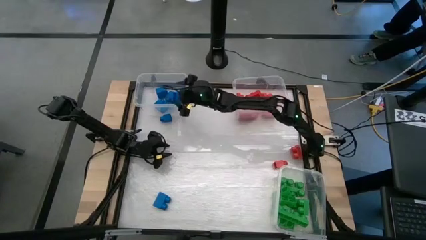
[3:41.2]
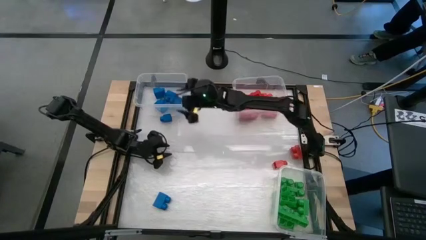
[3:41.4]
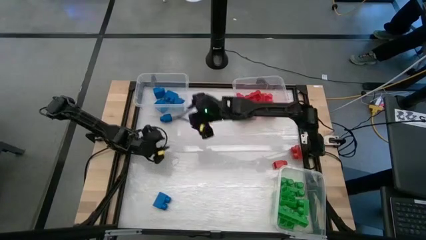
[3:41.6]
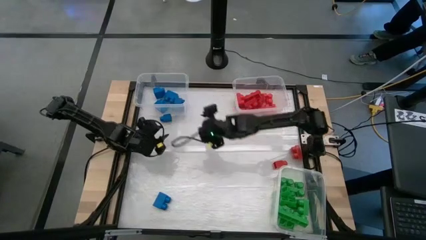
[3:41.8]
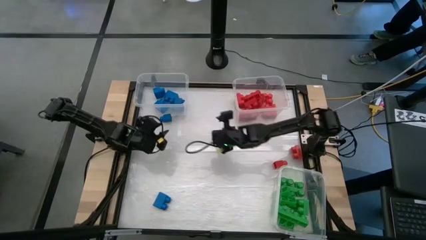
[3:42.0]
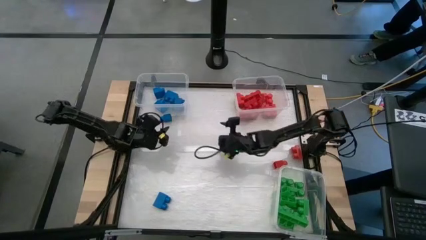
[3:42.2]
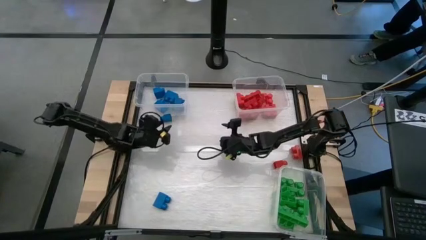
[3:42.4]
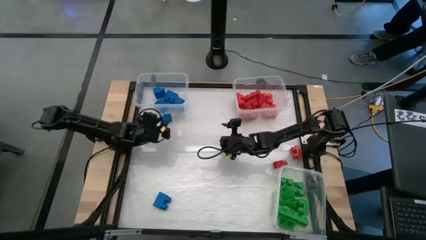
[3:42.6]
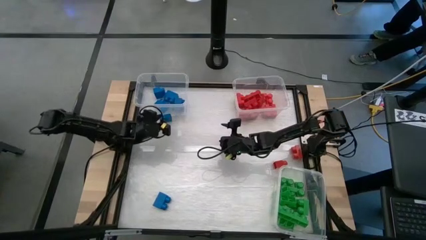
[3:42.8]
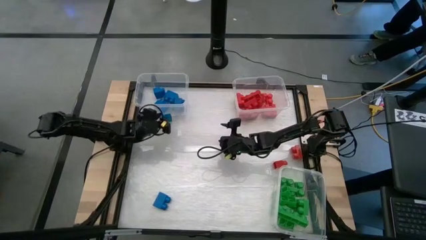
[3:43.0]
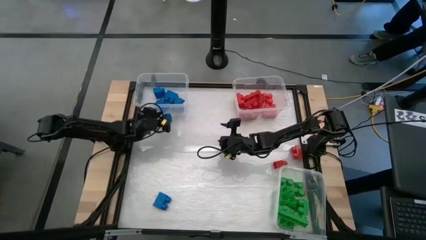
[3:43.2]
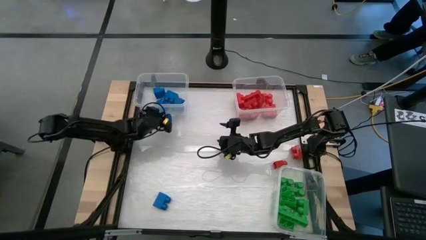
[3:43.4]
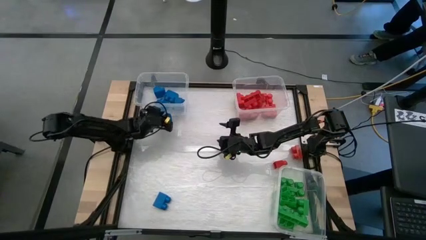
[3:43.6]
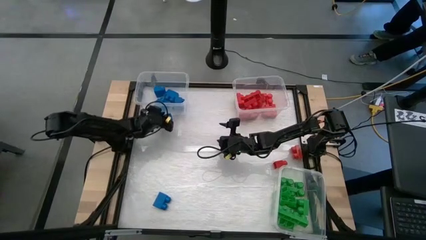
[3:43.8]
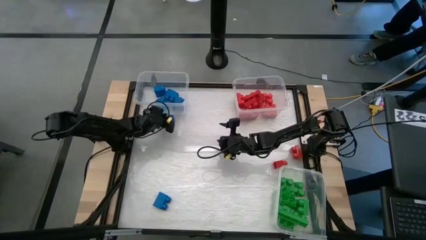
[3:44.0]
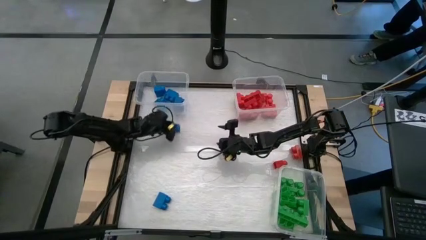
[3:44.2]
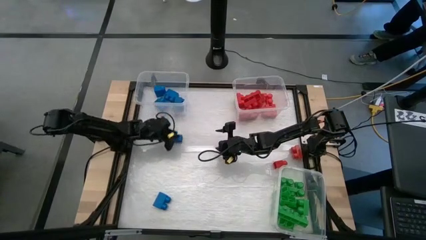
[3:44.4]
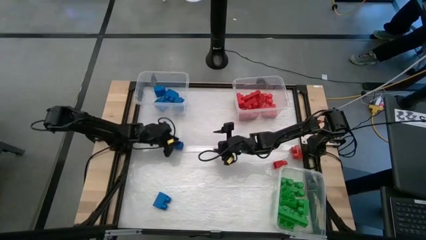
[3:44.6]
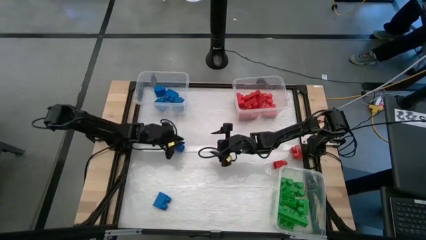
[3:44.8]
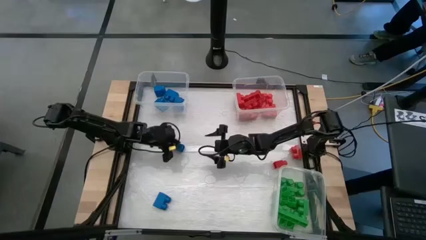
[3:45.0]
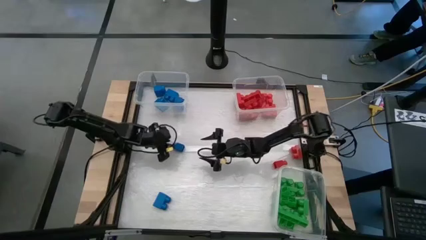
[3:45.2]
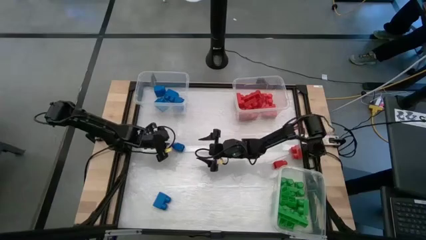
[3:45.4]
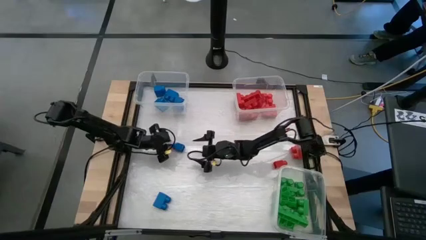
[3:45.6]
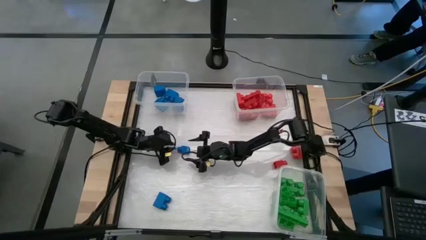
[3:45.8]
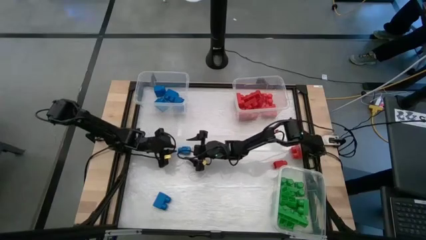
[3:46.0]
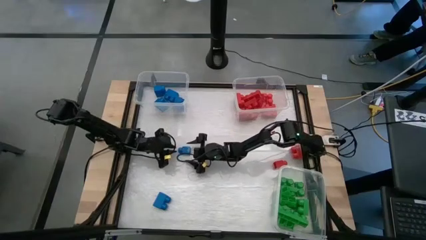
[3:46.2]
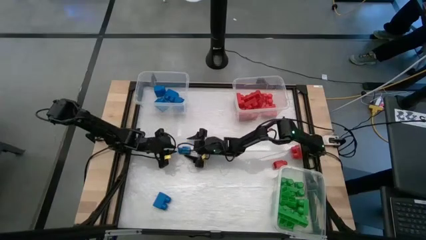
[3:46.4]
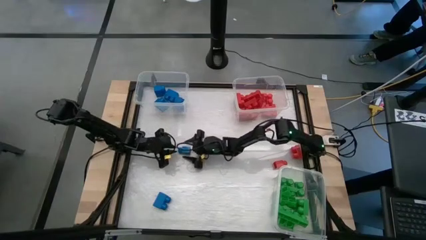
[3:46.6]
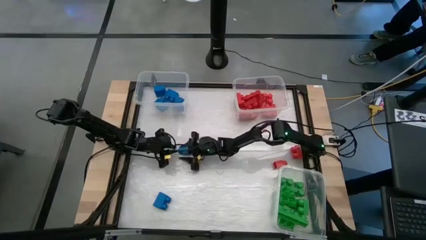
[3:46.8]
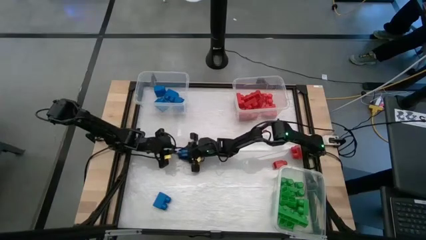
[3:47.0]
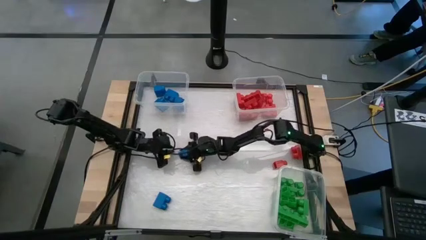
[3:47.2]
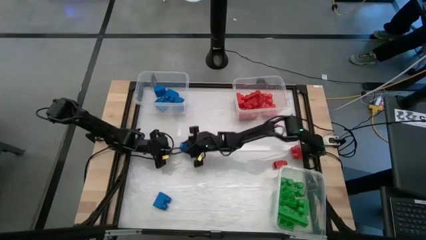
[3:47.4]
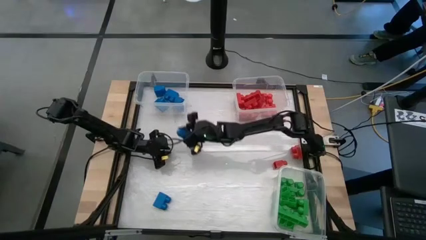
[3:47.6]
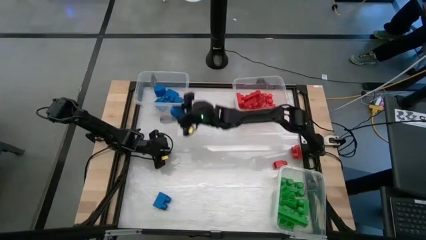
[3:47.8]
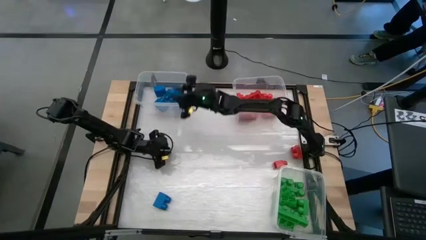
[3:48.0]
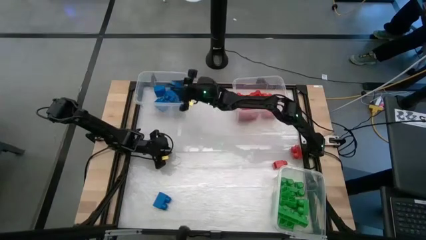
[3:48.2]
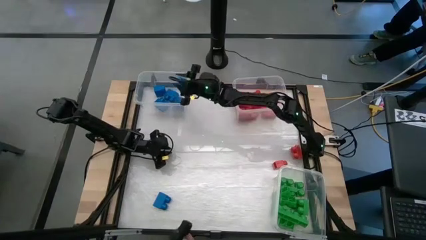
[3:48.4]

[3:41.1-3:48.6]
Task: Sort blocks
Put the blue game piece into the top left transparent bin

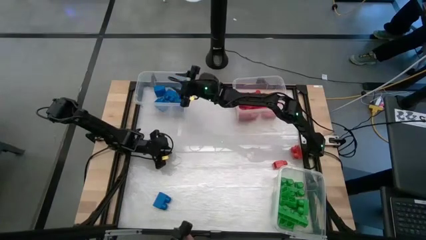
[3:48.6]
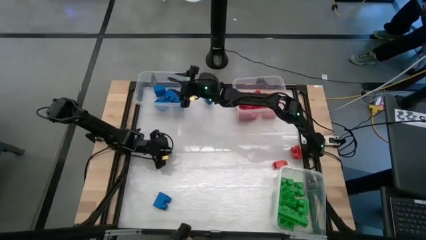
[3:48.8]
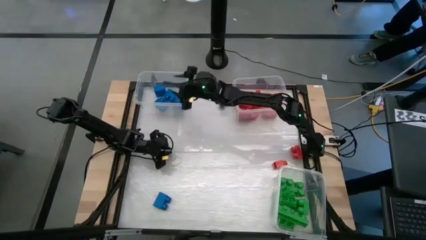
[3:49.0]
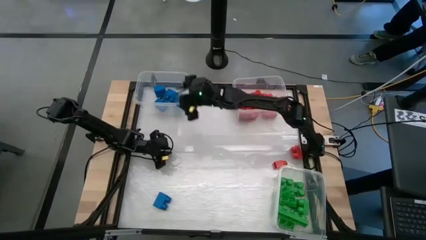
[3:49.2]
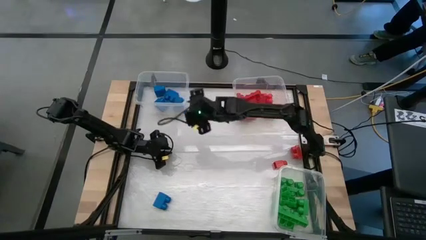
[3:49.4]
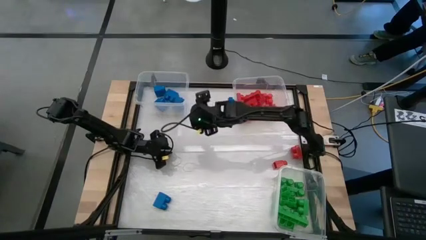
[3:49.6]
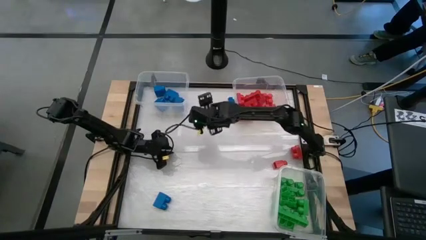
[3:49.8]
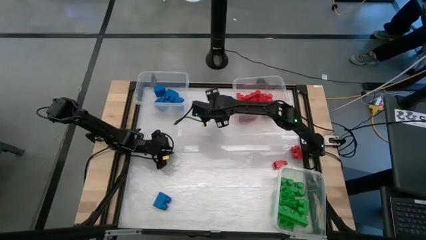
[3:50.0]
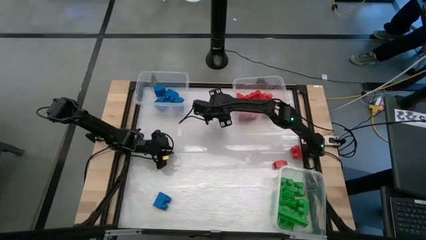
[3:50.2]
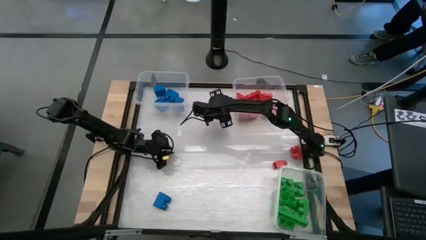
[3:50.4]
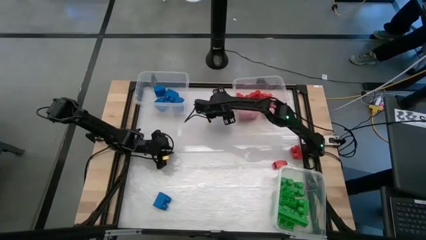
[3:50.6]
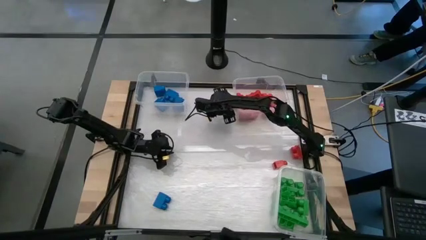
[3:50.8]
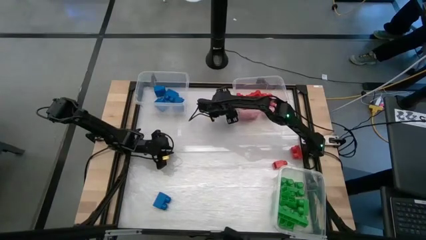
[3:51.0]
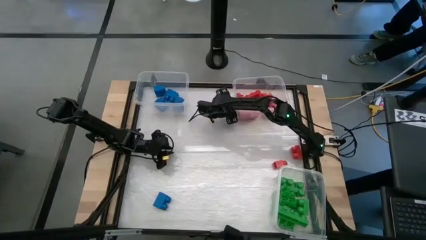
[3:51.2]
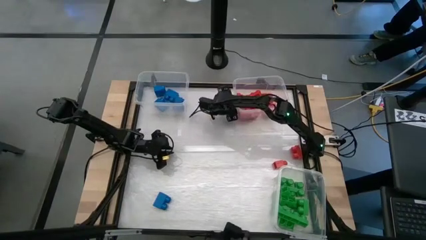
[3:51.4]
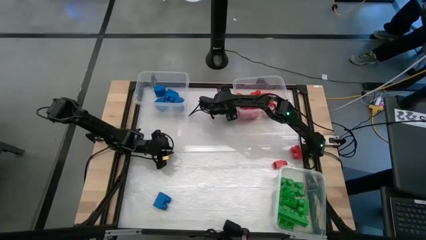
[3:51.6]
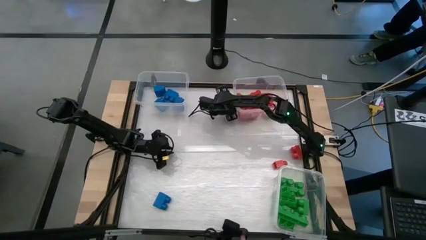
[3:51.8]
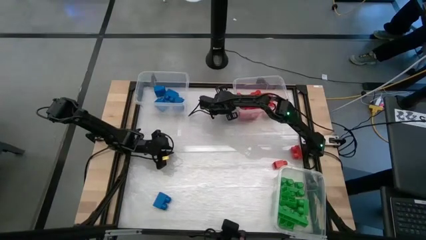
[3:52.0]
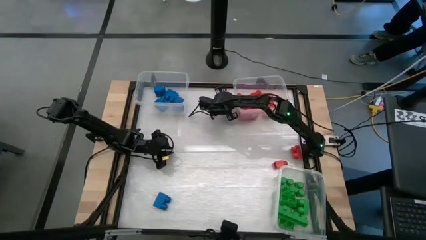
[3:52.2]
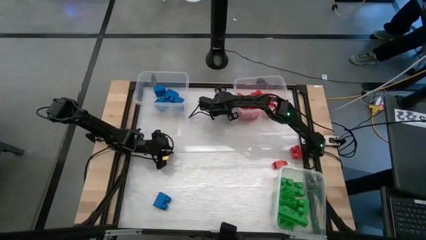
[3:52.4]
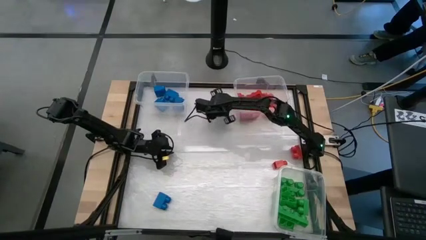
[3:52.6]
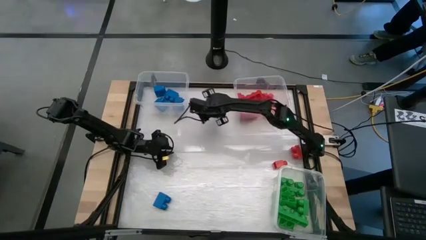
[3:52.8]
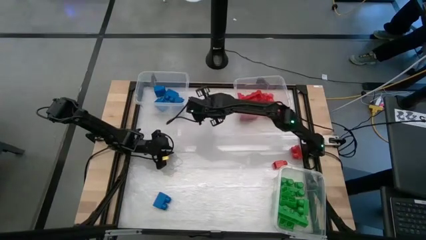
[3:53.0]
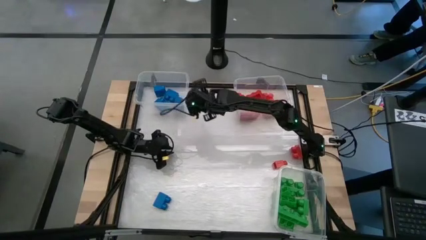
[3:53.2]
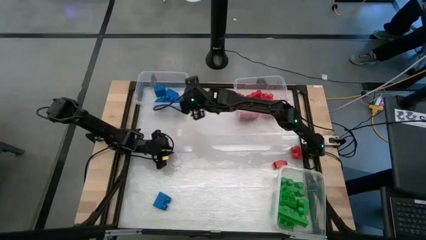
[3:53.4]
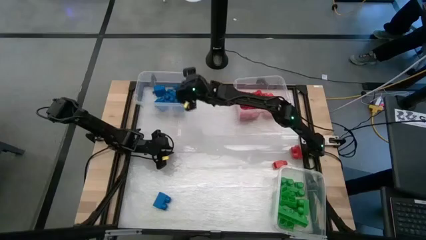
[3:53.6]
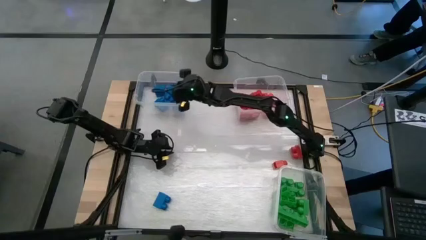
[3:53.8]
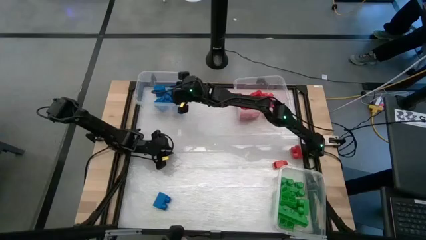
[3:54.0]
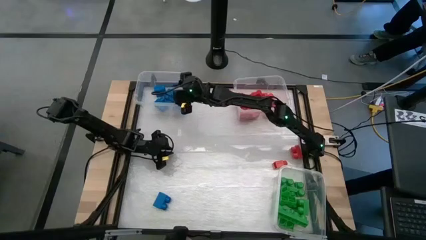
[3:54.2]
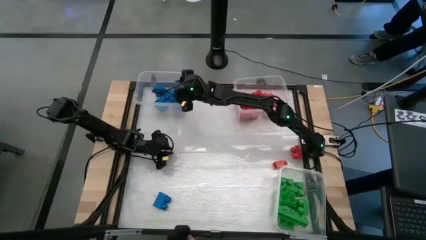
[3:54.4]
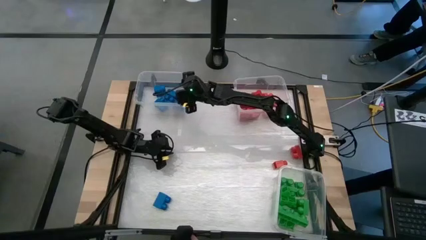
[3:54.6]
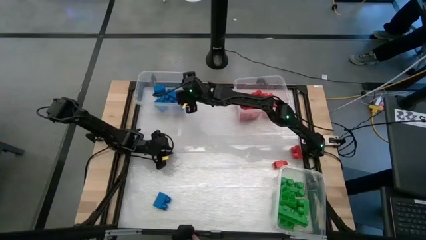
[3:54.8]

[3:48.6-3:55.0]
Put the blue game piece into the top left transparent bin

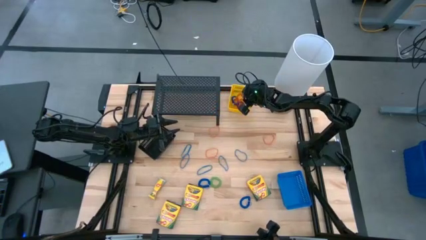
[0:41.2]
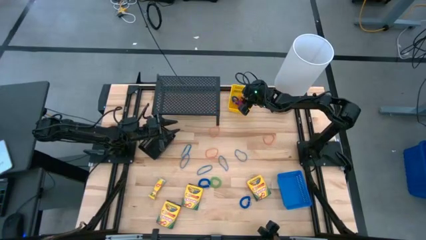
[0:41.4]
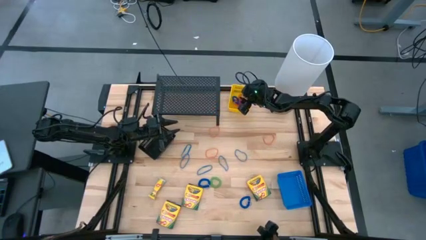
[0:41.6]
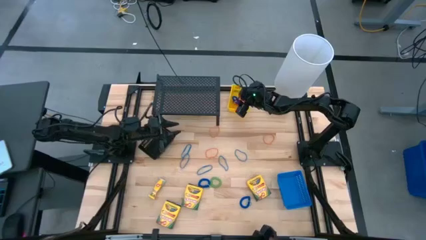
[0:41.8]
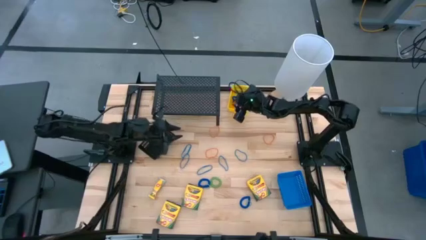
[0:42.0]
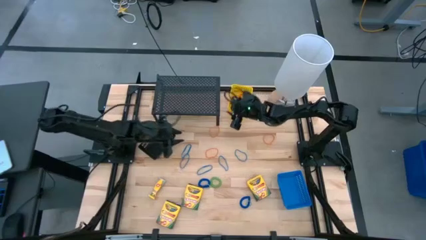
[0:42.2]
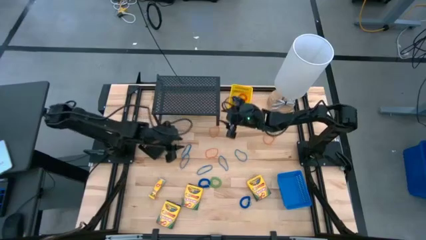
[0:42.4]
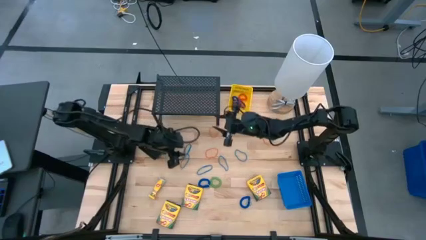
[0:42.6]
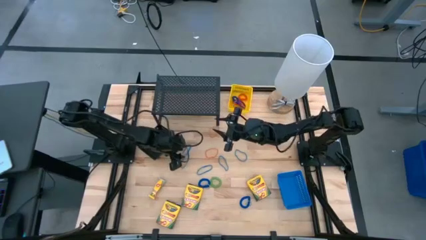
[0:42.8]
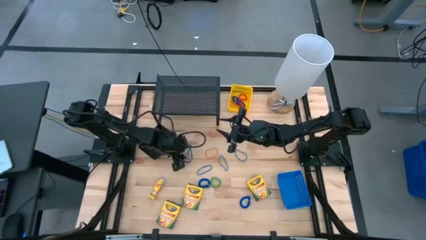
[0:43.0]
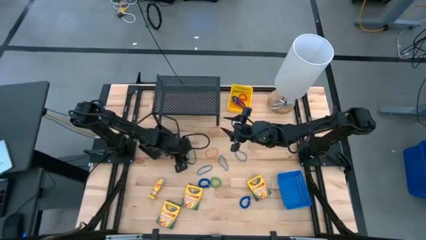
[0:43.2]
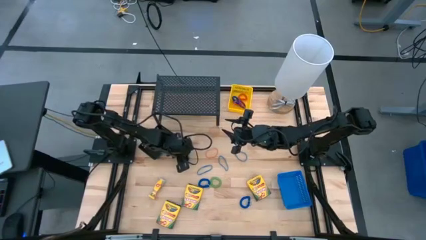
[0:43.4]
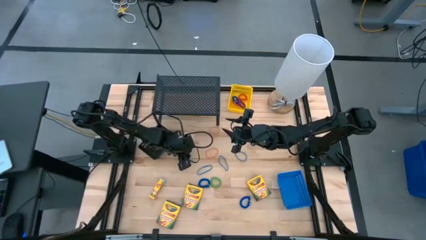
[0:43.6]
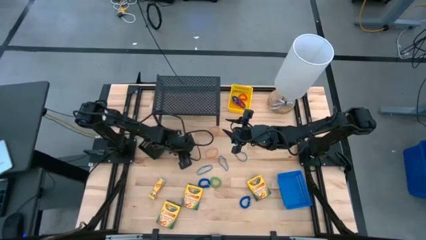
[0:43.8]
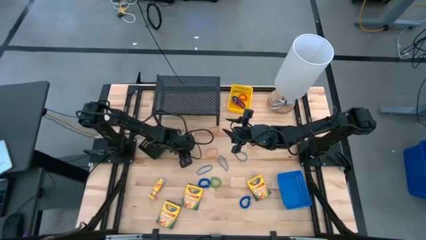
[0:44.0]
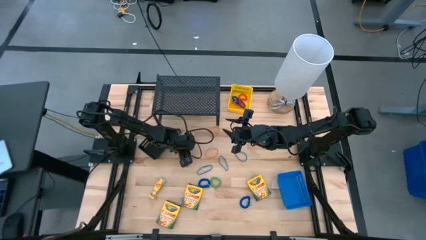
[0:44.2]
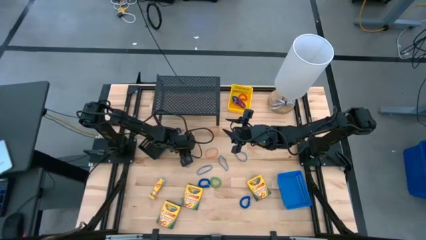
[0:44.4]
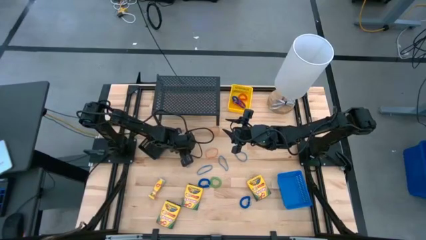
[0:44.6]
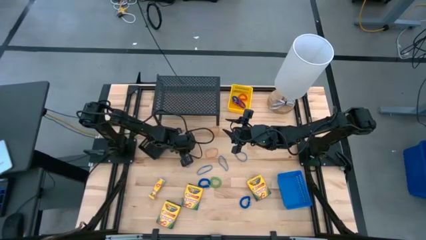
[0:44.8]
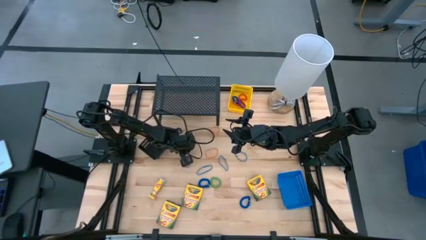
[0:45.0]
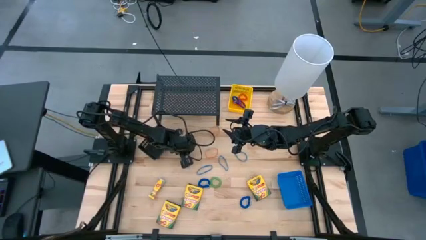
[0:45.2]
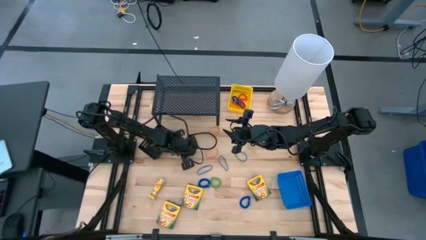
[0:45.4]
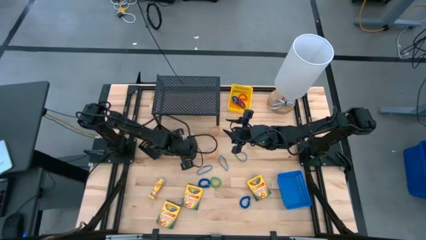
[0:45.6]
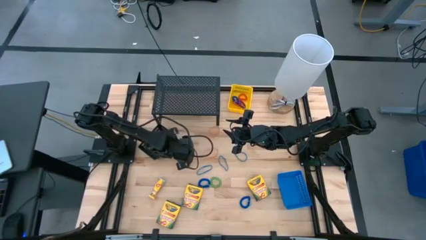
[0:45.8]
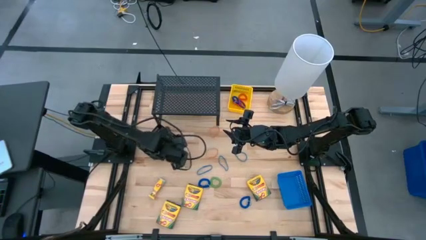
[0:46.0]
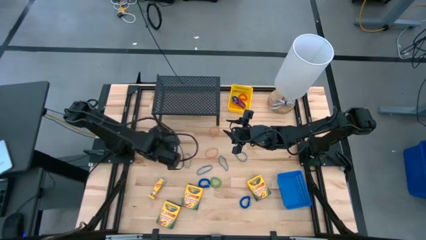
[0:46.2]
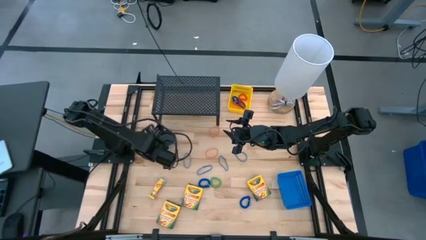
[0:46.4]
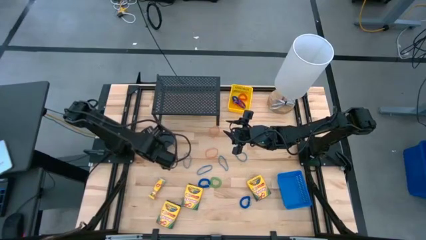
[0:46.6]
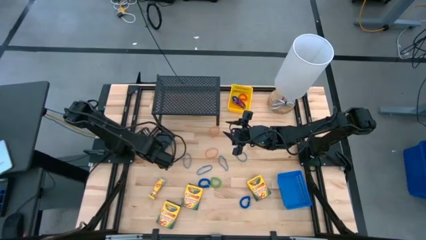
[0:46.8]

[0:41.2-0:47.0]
Task: Pick & Place Office Desk Supplies
Put the blue rubber band into the black bin
